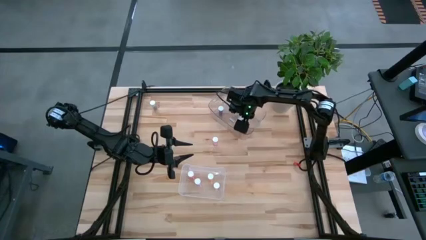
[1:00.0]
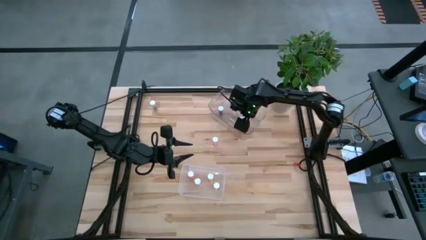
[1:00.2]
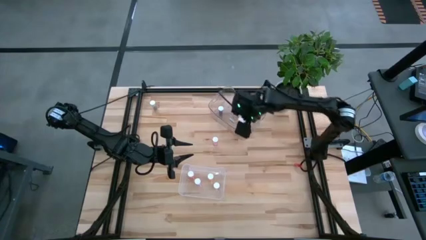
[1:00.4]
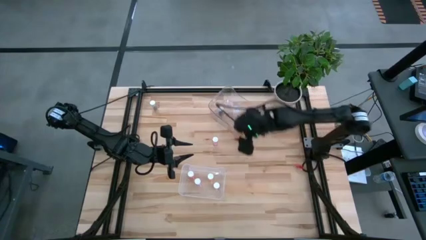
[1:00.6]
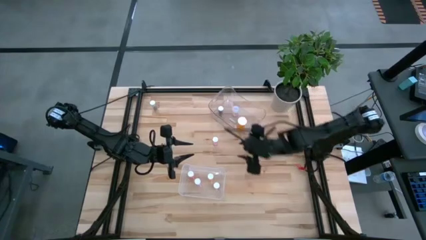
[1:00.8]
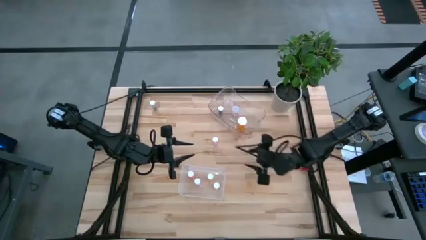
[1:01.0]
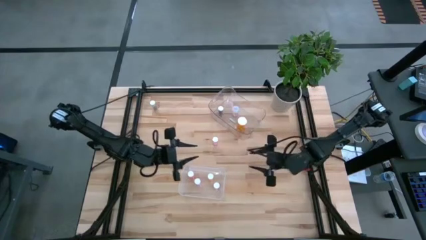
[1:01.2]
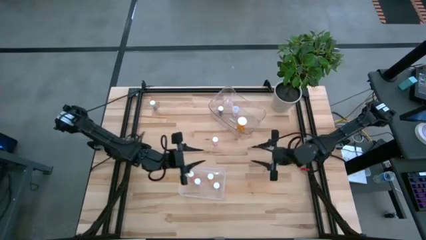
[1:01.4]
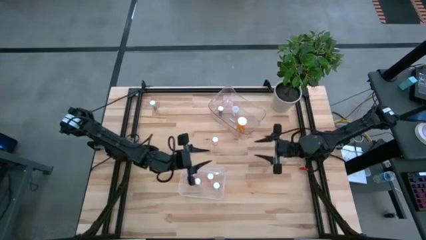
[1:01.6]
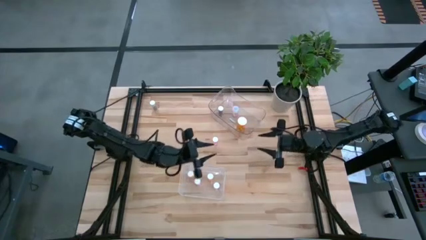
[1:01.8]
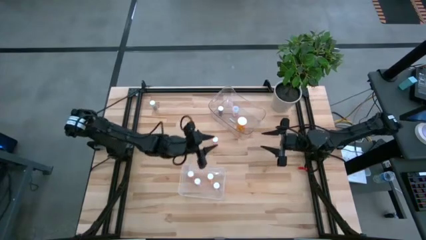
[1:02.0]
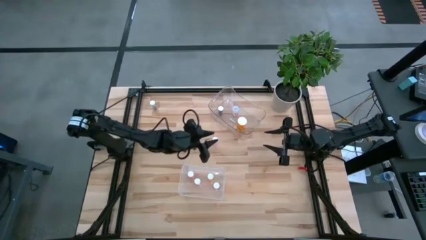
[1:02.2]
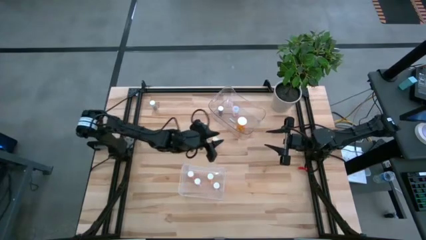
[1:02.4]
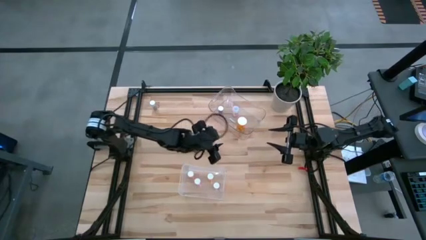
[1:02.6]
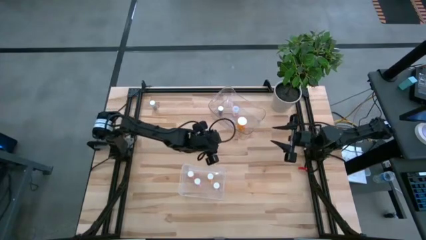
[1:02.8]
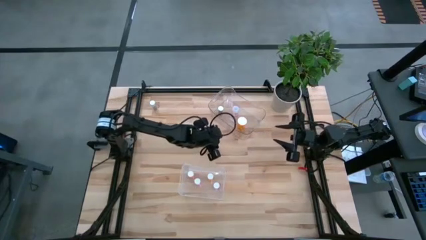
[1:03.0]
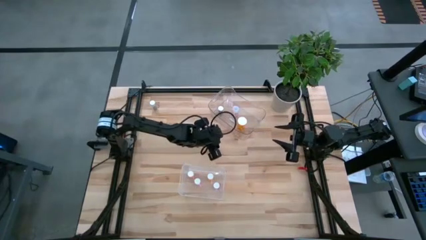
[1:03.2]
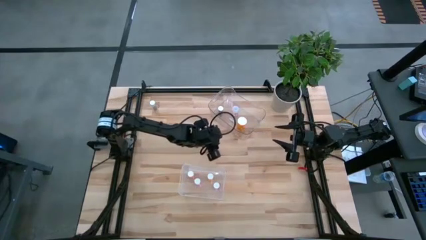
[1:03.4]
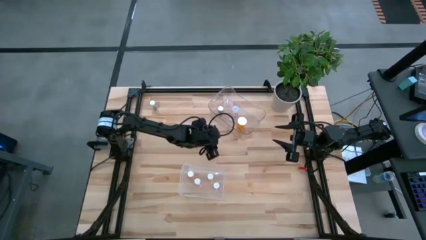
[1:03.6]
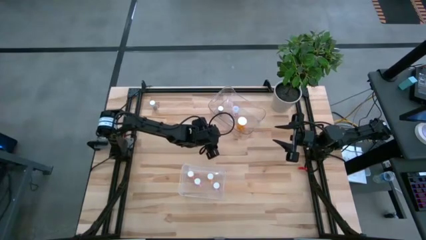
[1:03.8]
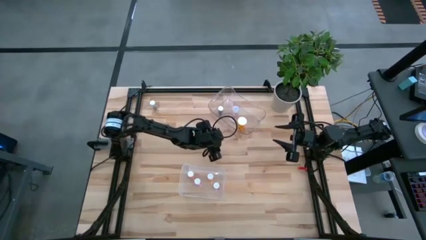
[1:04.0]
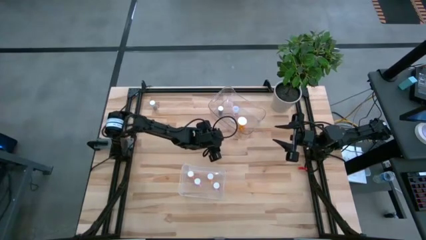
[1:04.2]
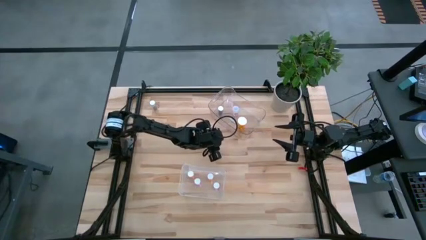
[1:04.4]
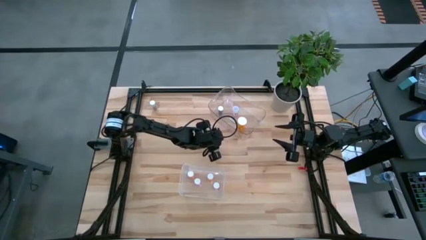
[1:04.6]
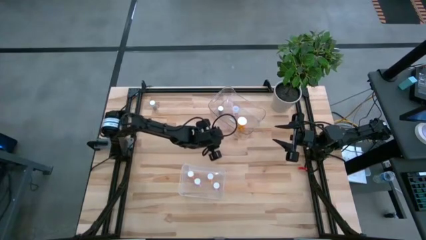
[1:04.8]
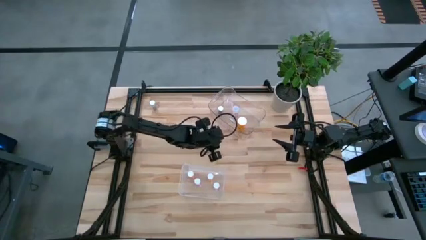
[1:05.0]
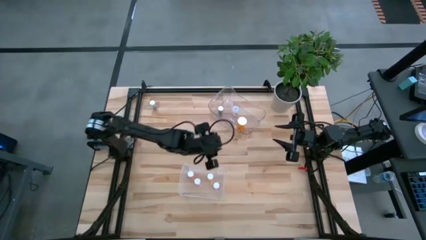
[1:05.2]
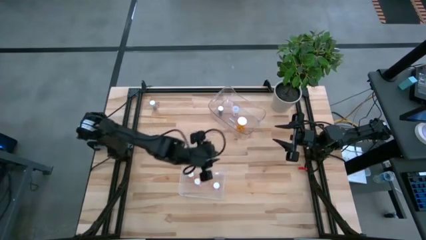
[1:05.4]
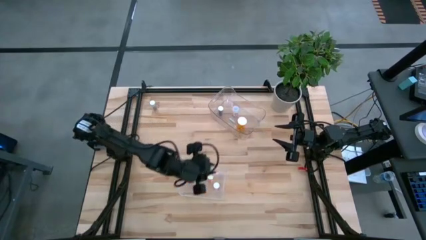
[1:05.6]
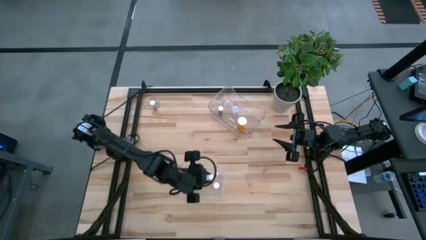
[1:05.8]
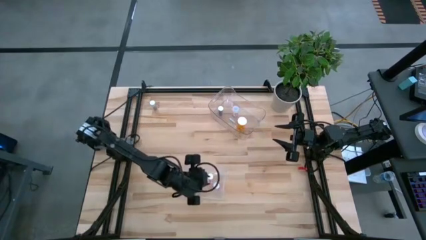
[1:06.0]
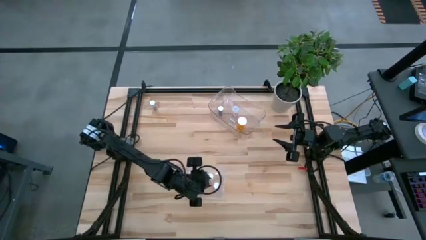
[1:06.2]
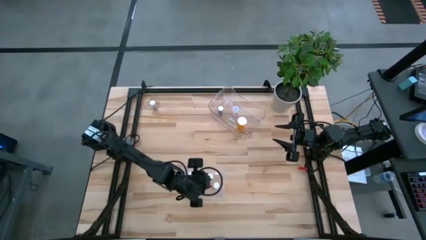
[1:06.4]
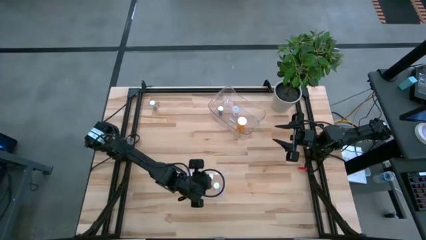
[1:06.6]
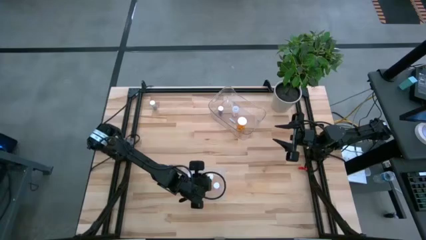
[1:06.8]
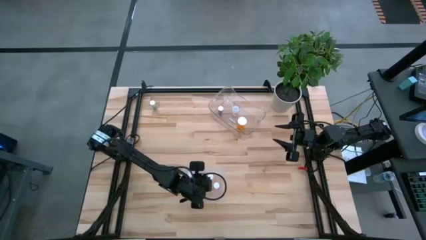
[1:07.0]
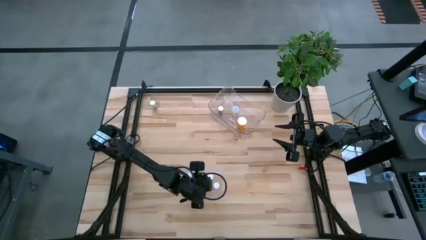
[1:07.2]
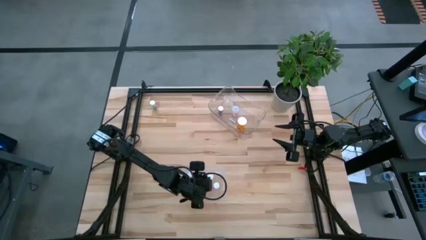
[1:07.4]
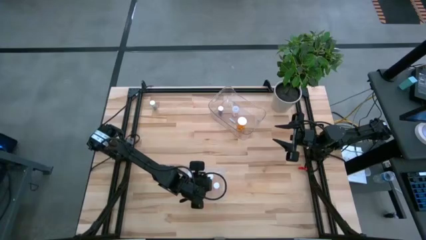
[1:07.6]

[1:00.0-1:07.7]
Task: Pick and place medicine bottles into bin by pill shape (circle, oval)
Put the purple tablet bottle into the bottom transparent bin

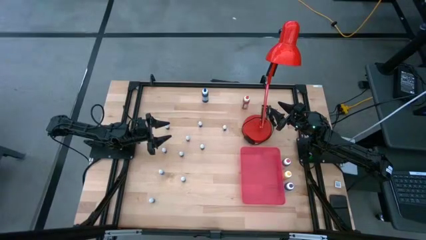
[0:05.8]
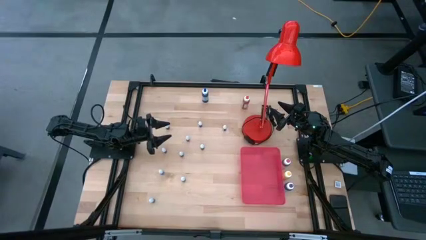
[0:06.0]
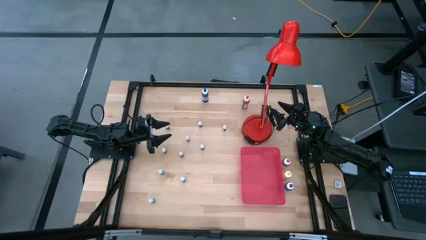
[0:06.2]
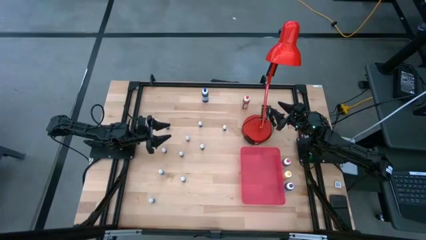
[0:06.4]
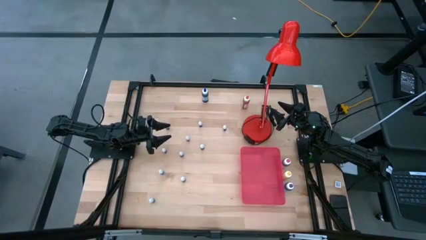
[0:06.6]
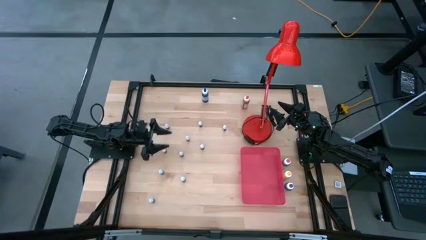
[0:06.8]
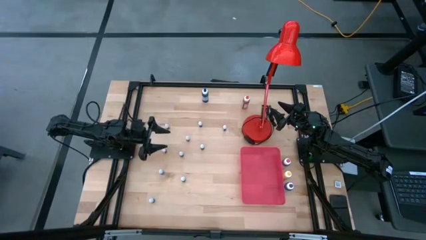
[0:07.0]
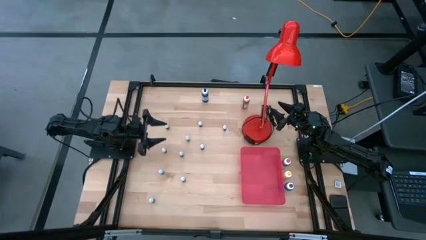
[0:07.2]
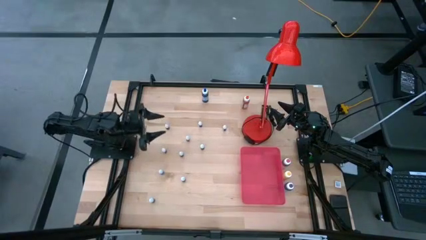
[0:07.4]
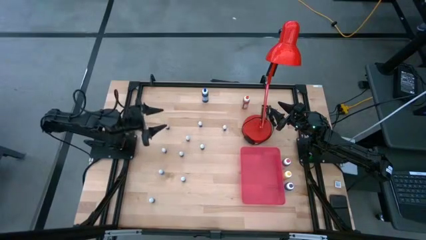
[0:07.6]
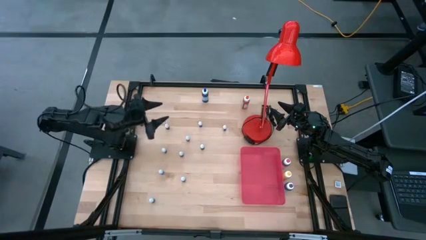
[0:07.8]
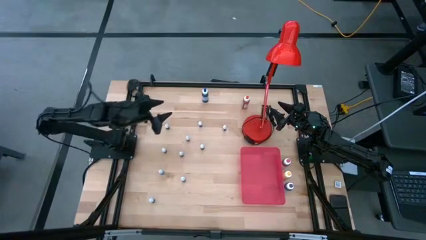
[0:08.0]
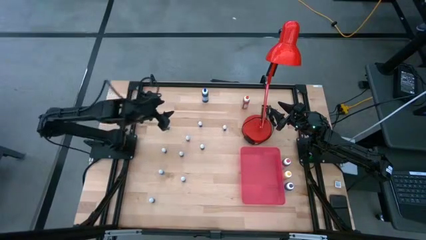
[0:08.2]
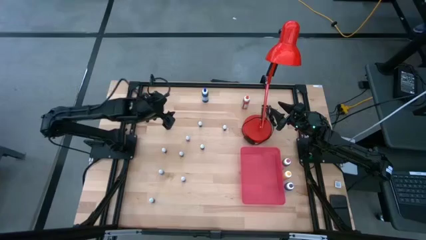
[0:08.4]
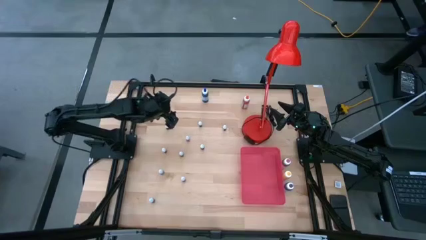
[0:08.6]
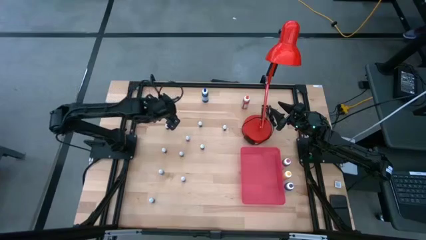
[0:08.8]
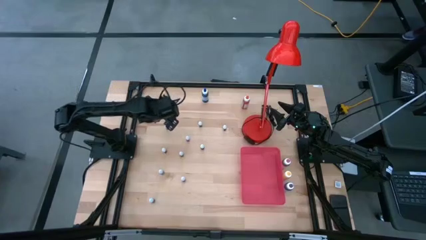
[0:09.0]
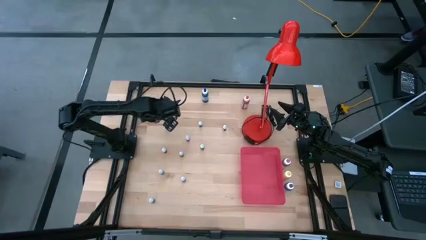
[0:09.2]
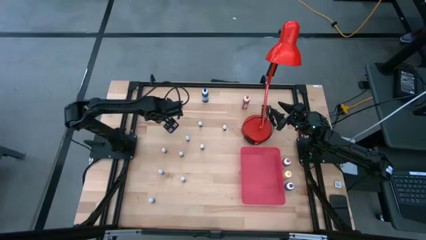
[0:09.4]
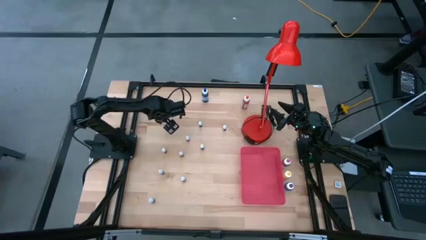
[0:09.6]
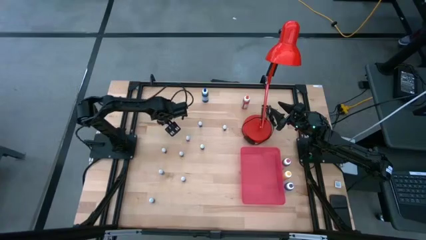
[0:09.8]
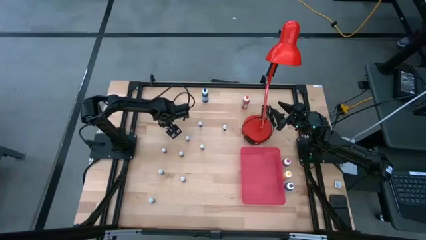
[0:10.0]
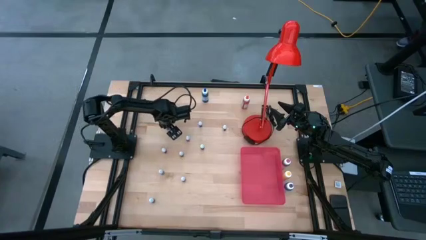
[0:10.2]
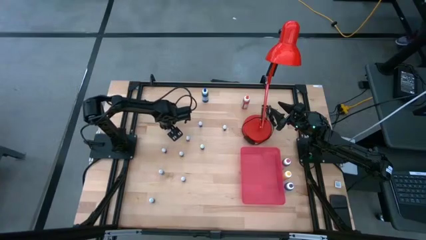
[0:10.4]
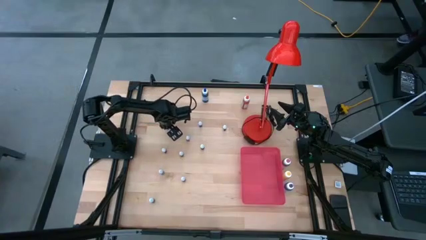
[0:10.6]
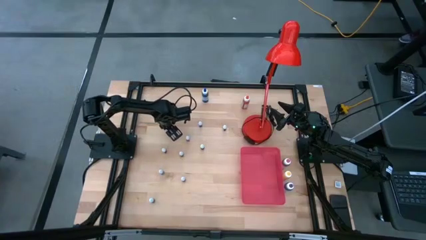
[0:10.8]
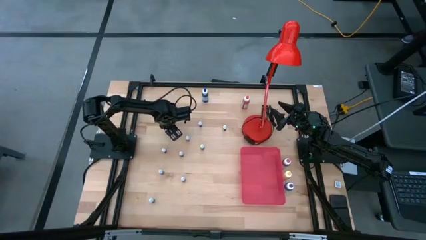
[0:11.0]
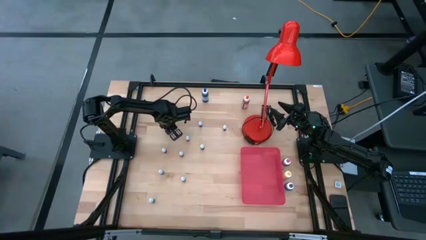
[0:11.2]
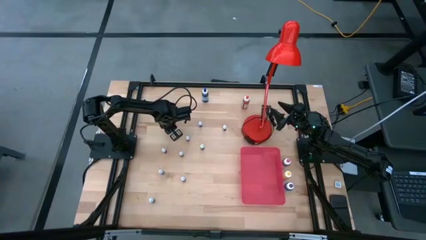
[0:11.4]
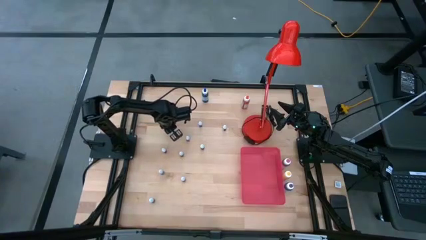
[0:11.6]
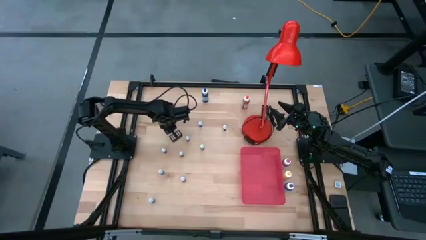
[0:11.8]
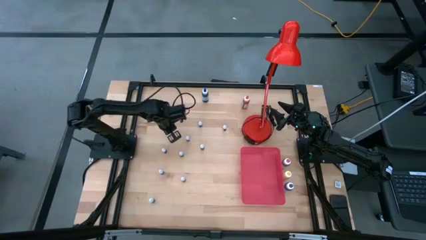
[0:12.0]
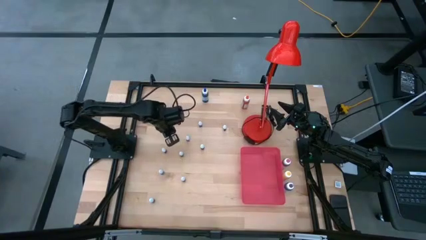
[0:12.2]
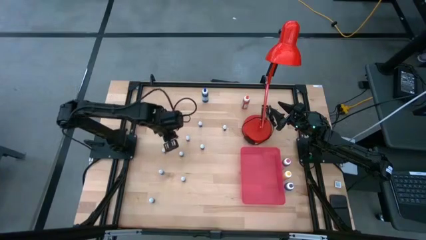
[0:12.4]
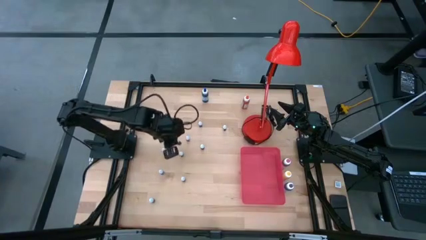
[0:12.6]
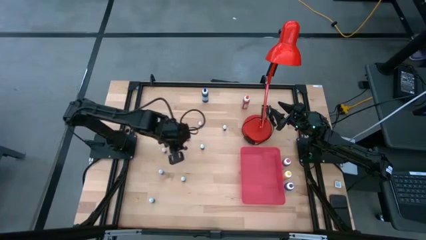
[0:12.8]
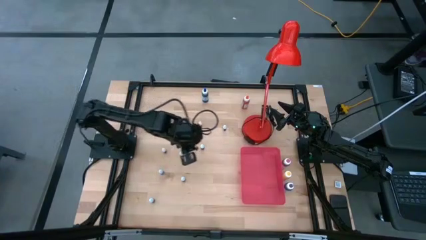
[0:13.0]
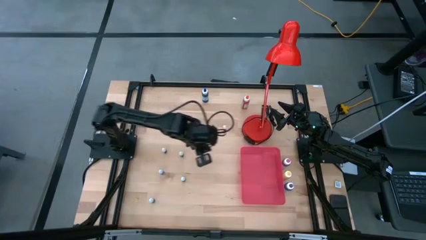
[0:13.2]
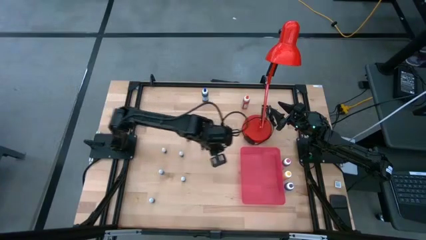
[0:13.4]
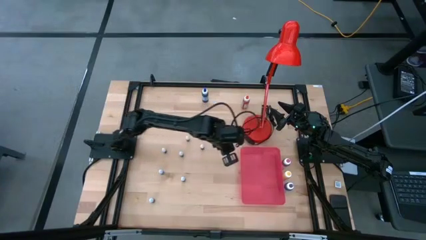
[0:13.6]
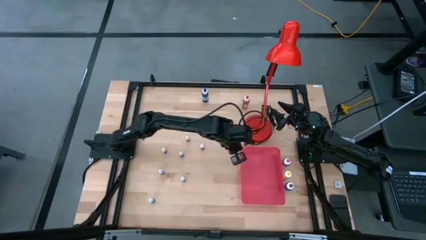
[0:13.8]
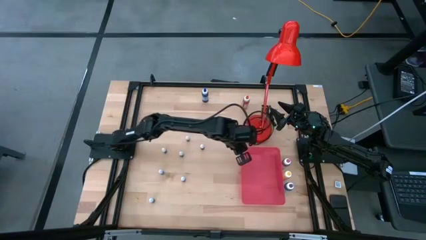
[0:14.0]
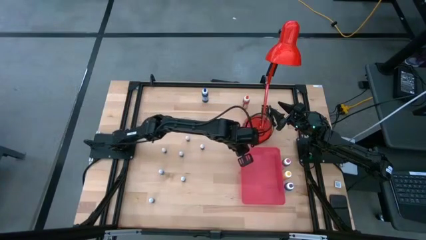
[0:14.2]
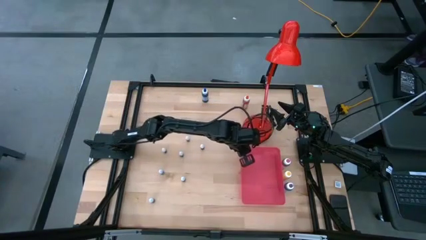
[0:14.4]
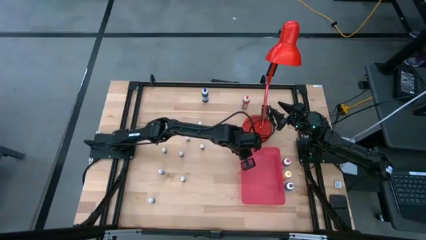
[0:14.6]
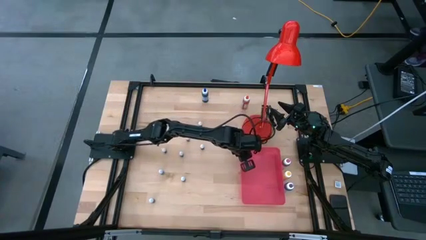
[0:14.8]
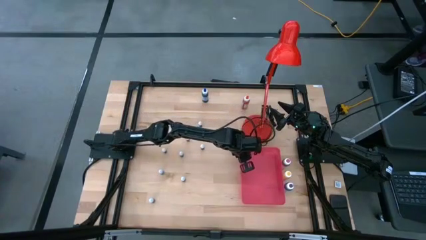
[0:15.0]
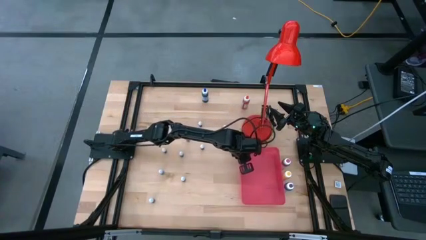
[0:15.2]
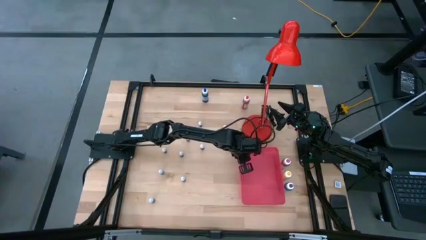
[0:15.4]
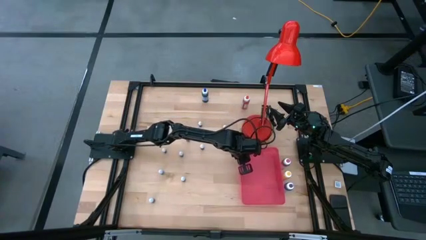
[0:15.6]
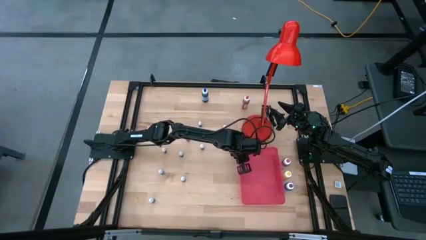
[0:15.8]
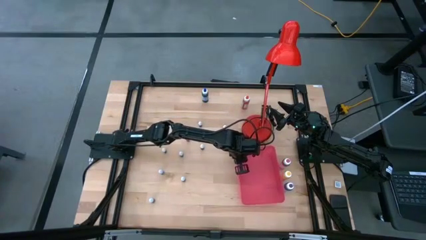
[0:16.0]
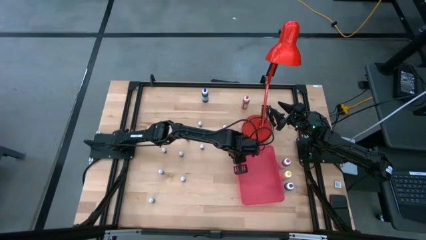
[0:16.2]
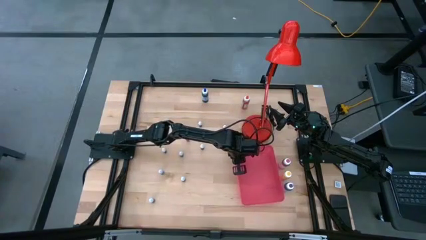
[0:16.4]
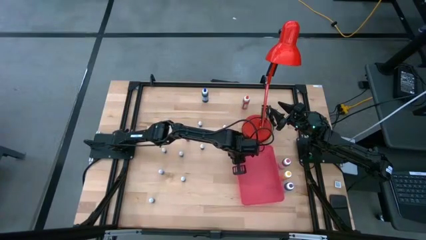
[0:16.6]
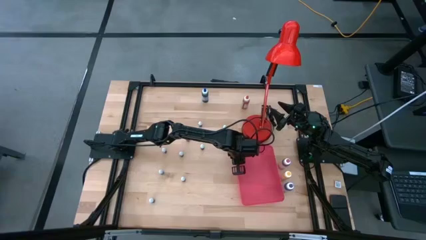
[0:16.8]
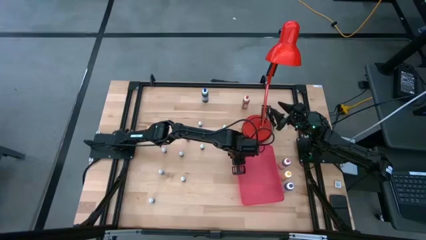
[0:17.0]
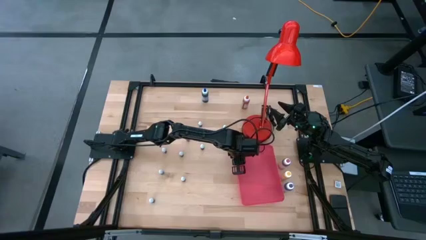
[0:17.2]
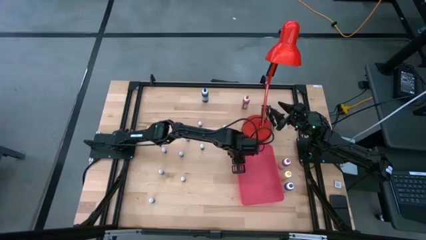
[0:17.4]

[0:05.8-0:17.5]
Task: Pick & Place food coloring
Put the small pink food coloring bottle into the red bin
